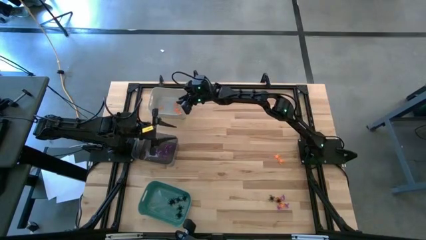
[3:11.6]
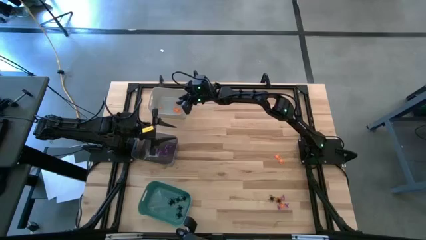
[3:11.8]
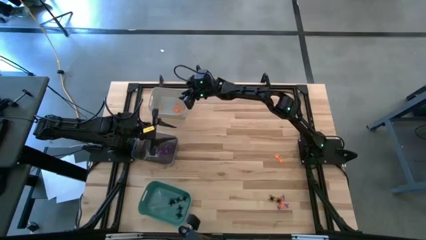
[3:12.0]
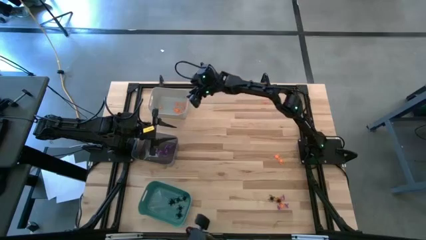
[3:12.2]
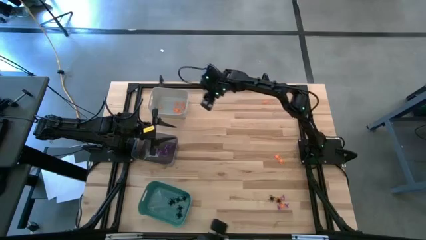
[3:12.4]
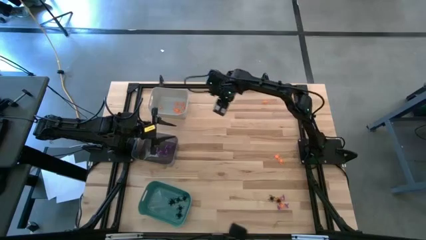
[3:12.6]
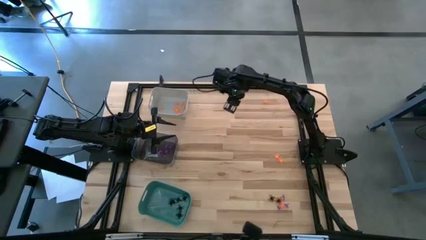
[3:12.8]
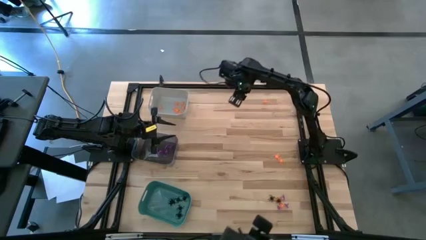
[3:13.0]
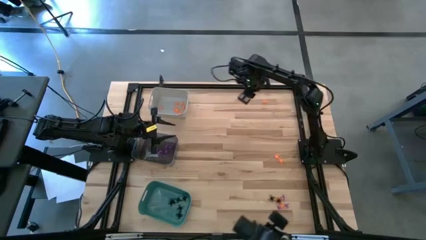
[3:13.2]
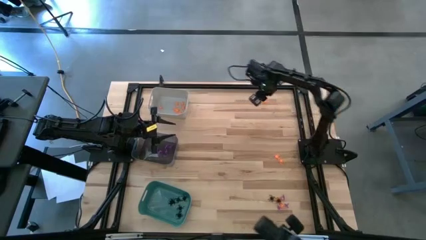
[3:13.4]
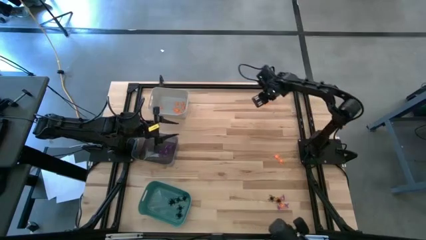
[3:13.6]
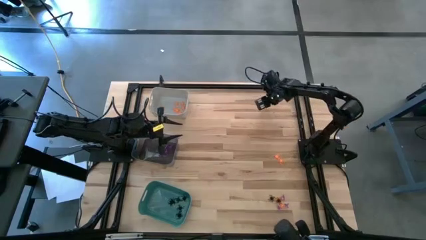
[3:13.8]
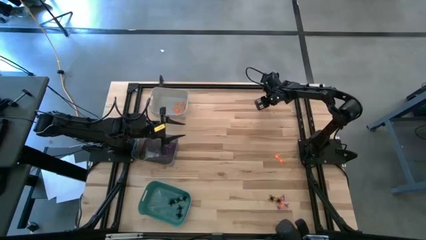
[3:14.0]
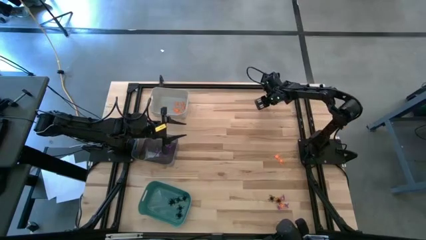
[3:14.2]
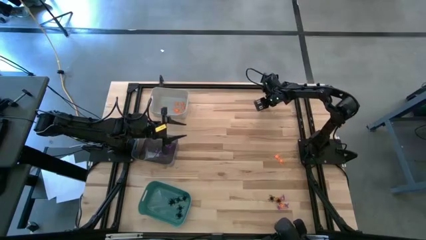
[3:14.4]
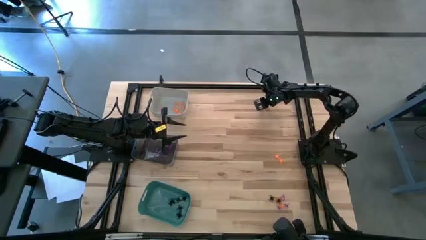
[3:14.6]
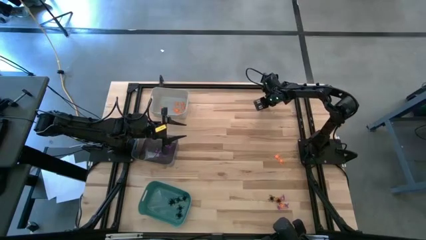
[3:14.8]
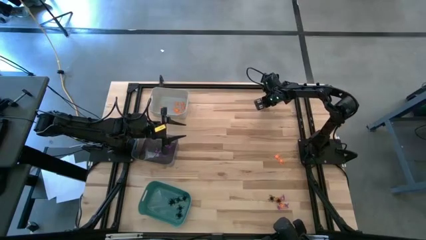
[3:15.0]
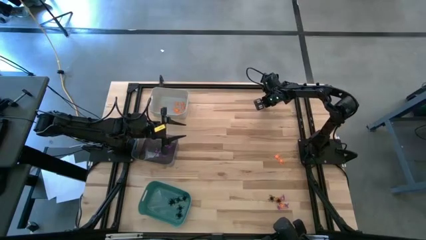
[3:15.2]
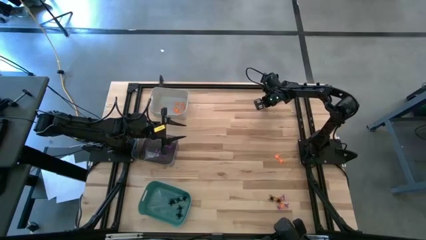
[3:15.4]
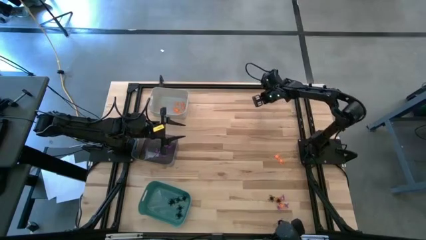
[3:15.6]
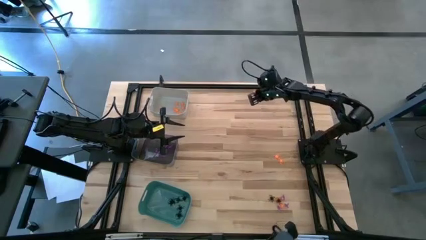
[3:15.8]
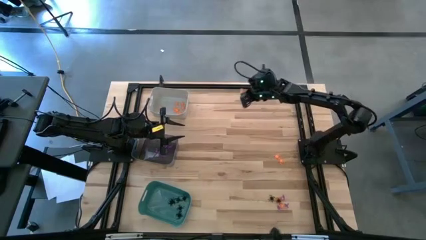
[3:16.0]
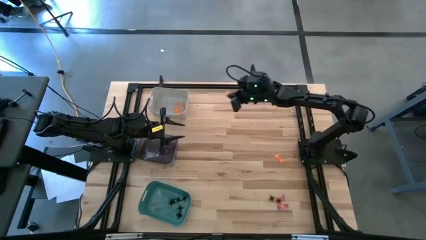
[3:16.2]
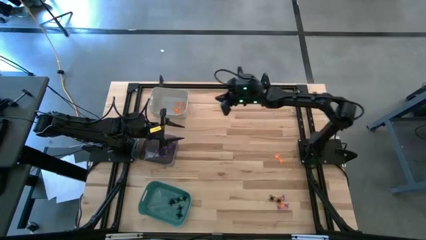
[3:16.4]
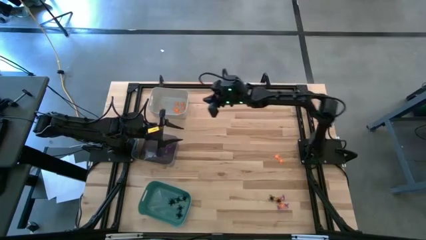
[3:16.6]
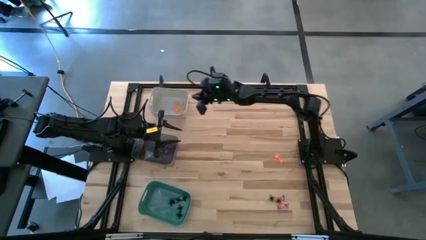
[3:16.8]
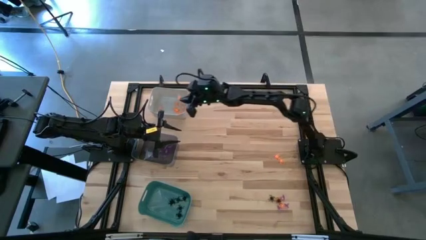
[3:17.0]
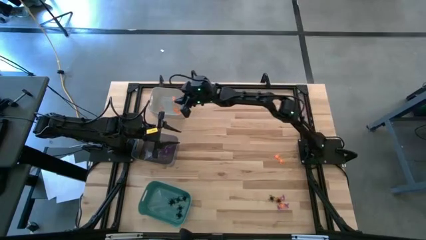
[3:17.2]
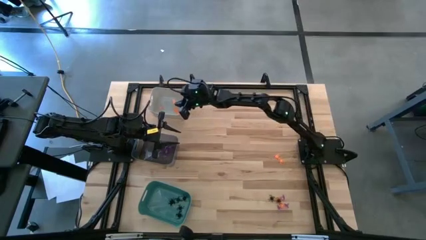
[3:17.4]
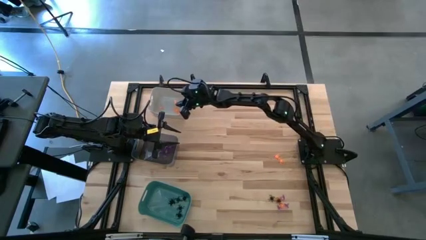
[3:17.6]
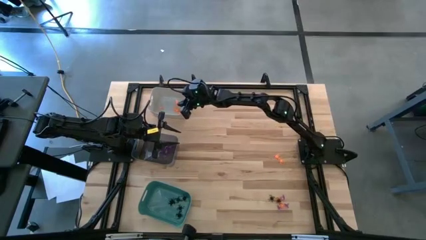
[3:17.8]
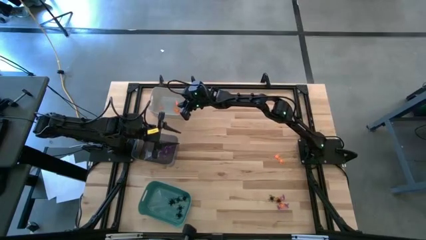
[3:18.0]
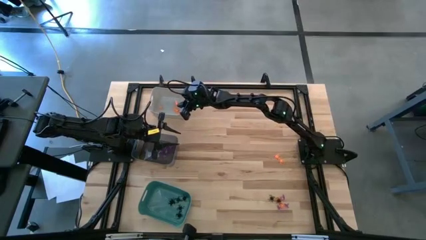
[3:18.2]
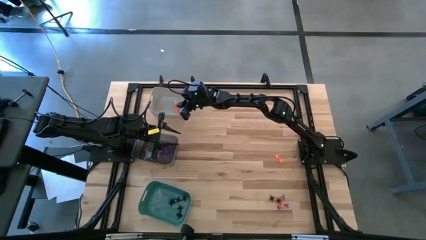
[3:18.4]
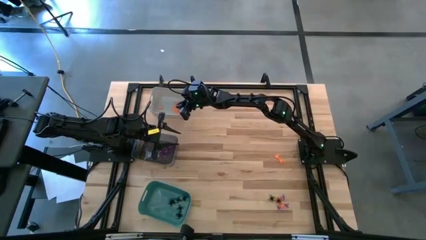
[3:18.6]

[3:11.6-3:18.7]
Task: Sort Halloween decoration
Put the top right orange spider into the gray bin

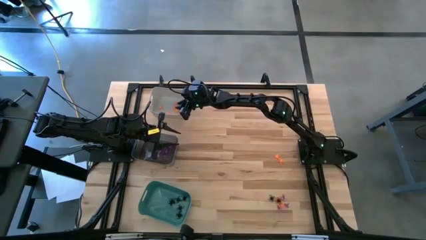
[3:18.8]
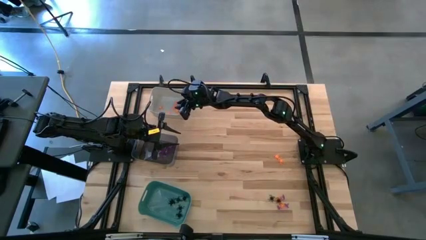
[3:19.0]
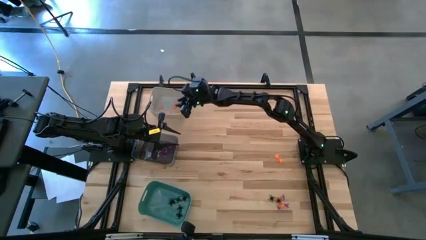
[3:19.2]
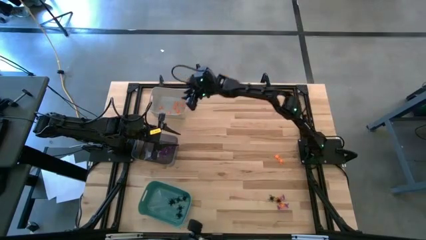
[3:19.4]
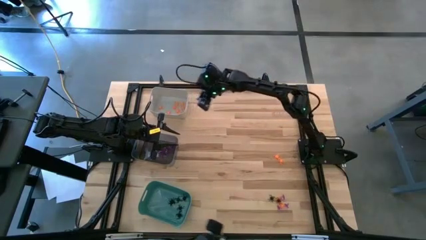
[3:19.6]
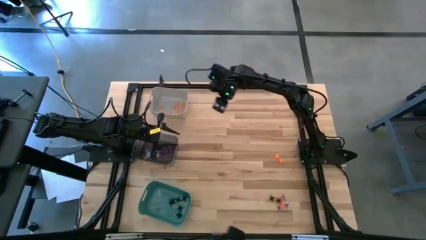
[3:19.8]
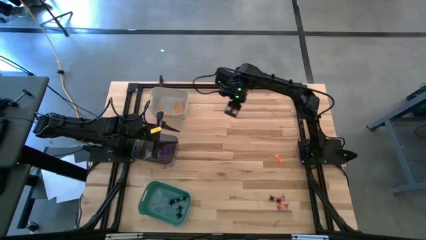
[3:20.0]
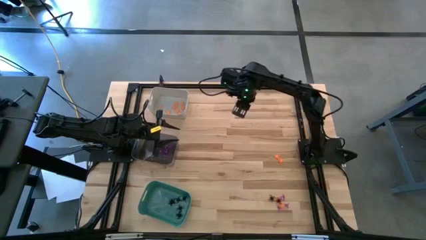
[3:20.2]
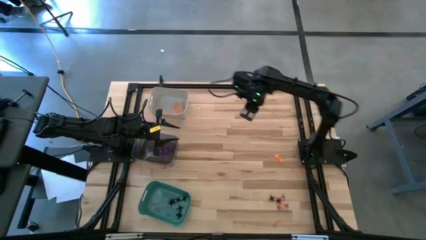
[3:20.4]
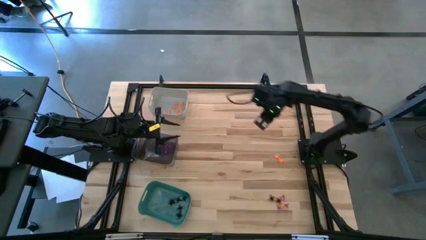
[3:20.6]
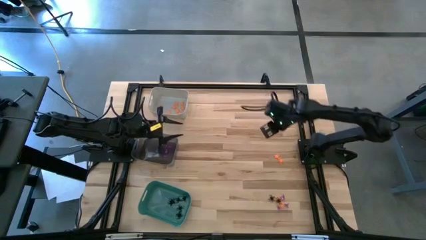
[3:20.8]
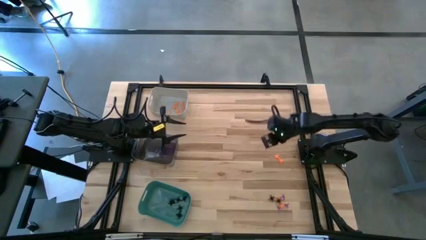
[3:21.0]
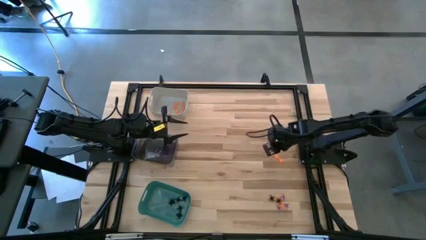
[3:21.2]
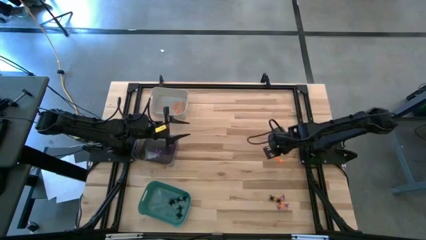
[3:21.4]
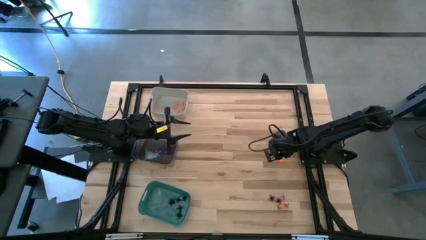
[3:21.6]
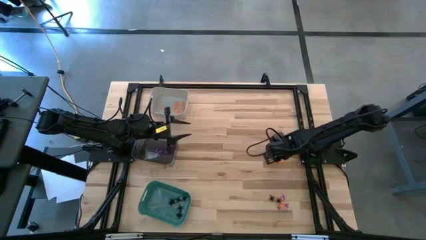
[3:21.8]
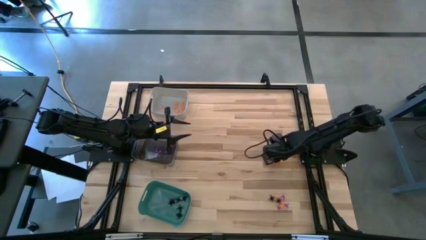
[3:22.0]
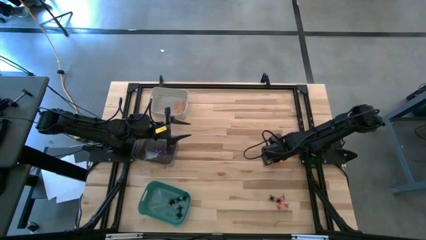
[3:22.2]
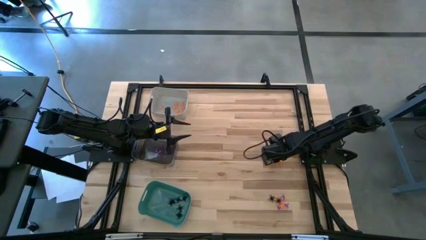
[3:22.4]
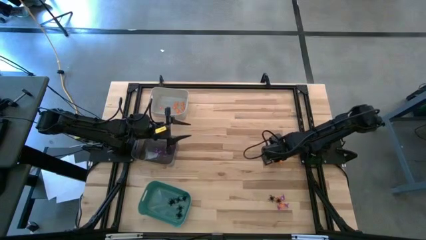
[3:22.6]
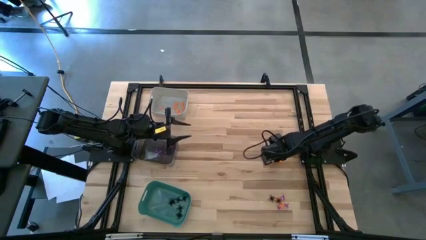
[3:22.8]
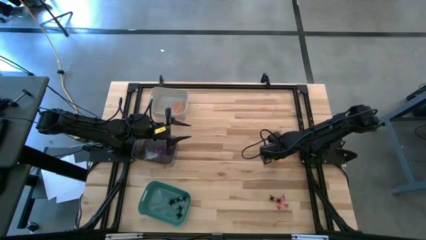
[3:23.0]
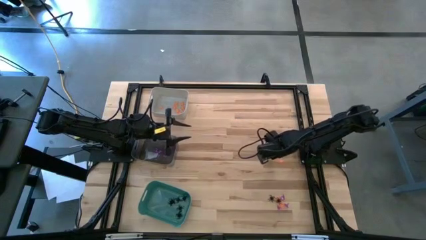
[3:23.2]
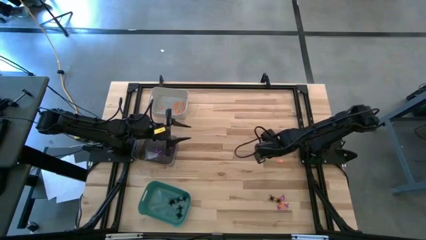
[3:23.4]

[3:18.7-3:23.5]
Put the middle right orange spider into the gray bin

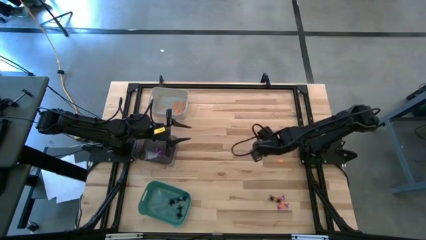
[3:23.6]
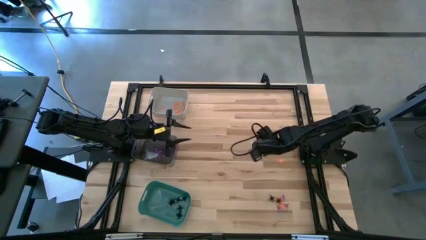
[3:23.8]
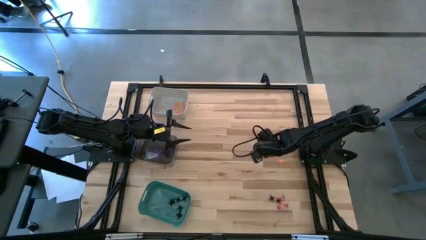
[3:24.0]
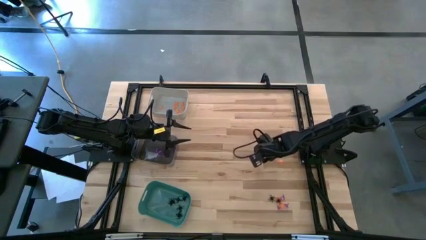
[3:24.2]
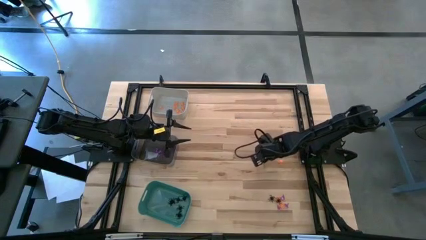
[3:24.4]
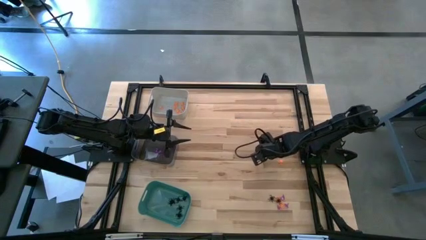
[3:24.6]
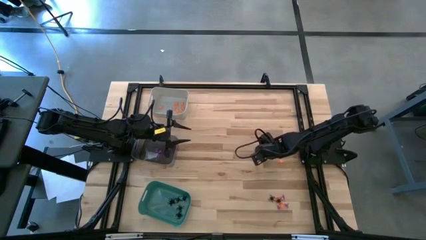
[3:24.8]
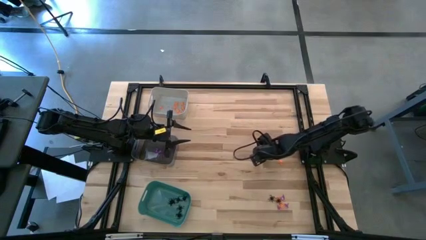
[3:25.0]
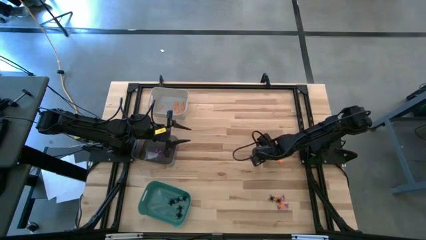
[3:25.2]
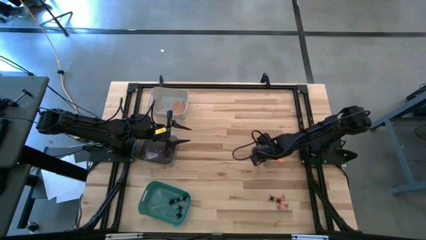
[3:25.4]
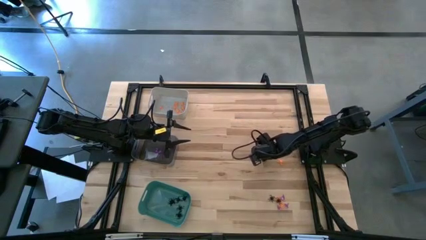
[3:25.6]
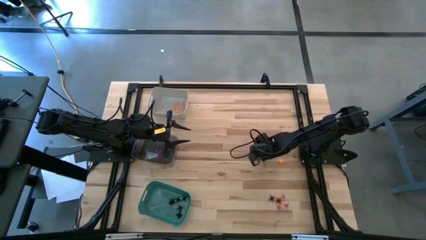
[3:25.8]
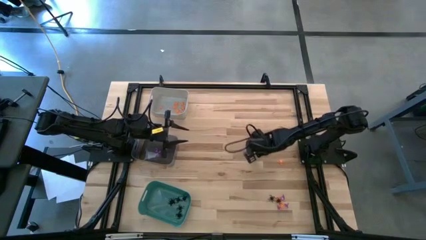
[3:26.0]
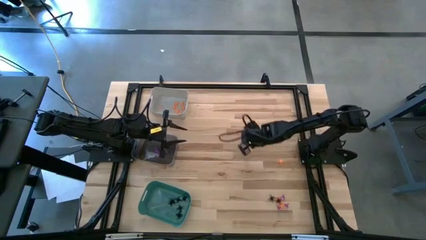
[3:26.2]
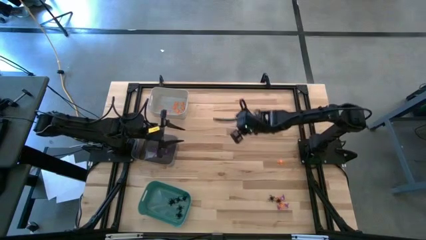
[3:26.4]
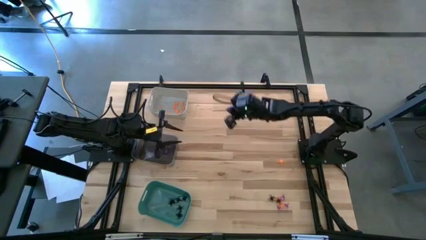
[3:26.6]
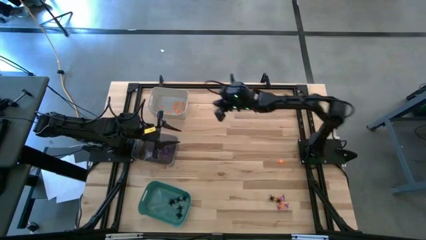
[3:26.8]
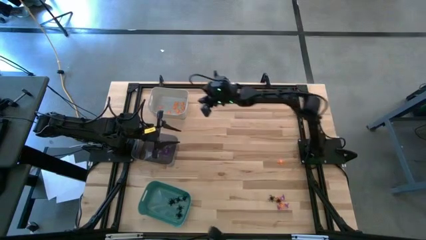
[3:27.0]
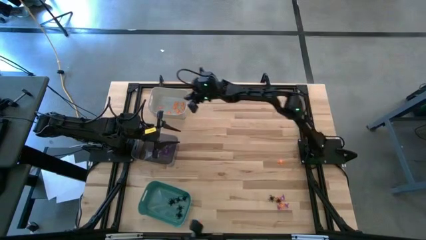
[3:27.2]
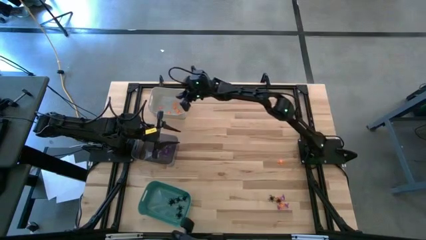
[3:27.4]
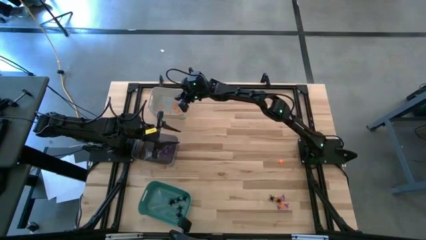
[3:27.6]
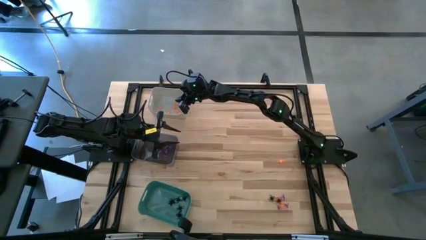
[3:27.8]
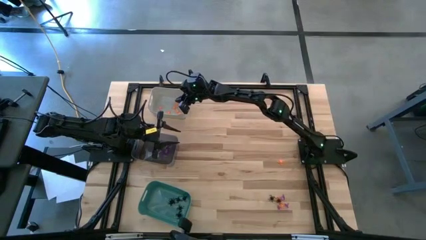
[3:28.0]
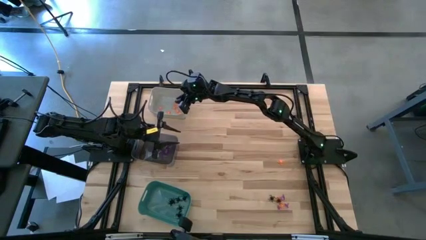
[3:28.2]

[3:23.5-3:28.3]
Put the middle right orange spider into the gray bin
